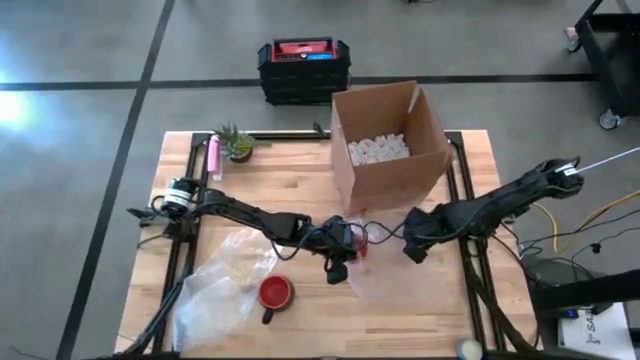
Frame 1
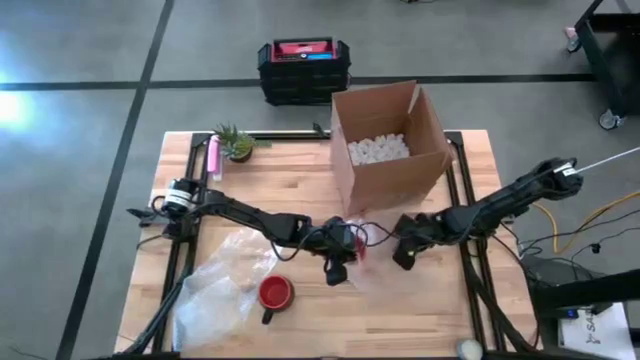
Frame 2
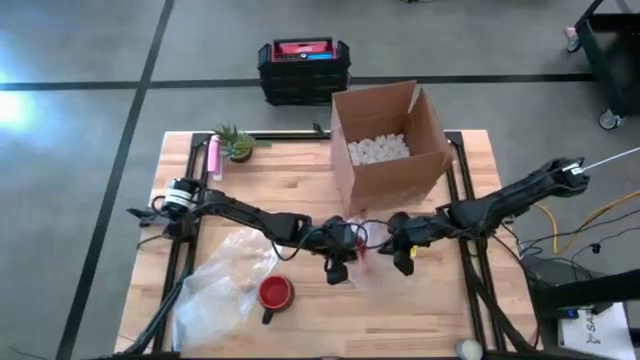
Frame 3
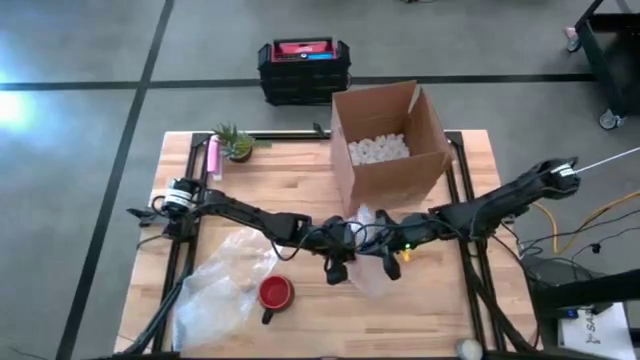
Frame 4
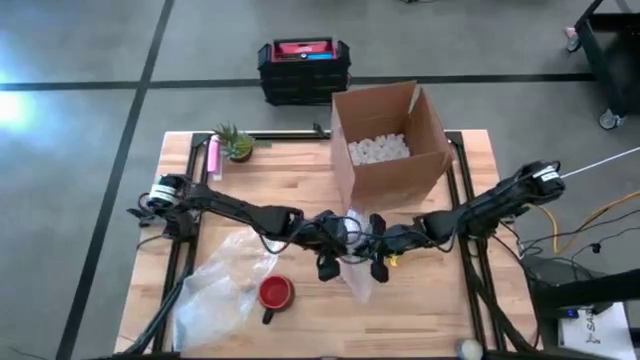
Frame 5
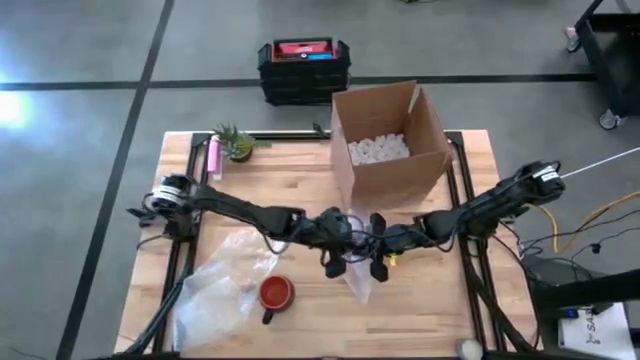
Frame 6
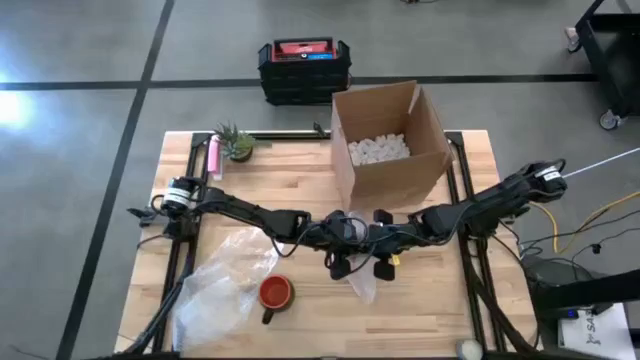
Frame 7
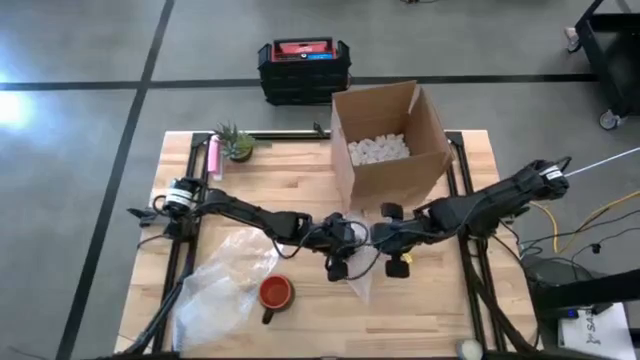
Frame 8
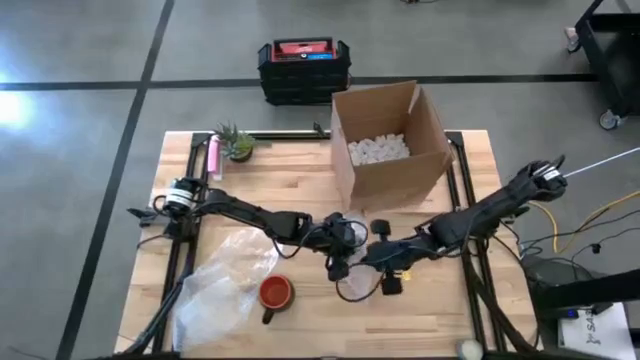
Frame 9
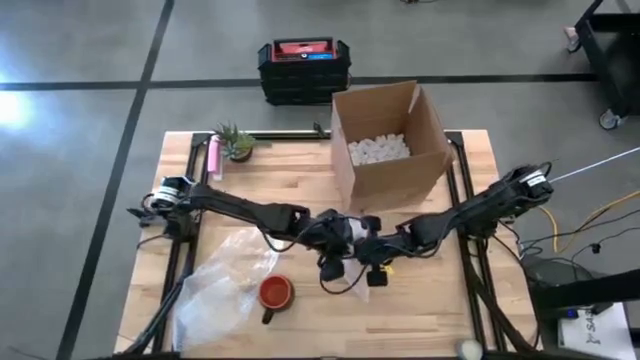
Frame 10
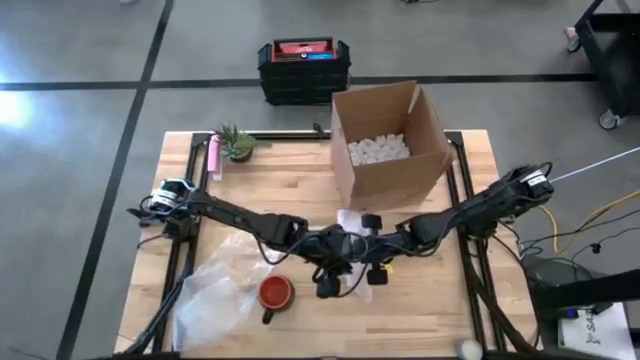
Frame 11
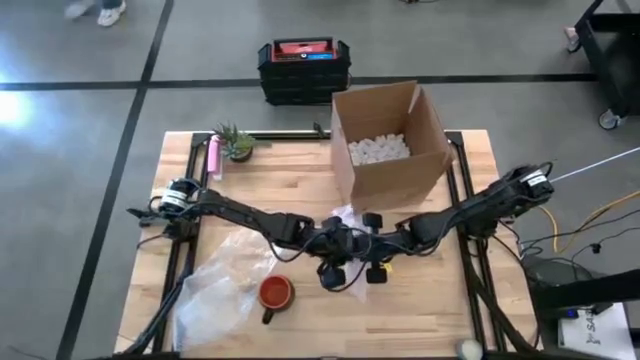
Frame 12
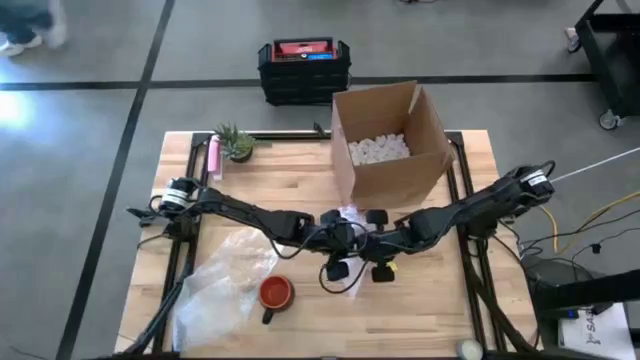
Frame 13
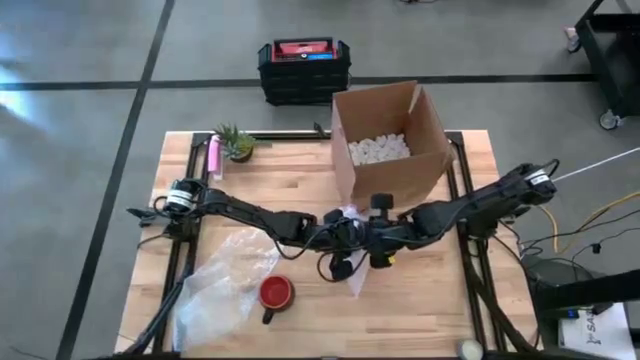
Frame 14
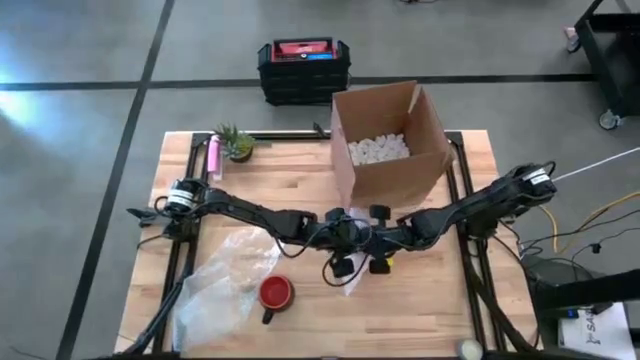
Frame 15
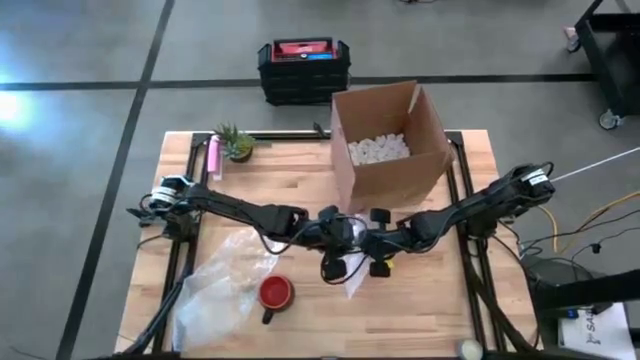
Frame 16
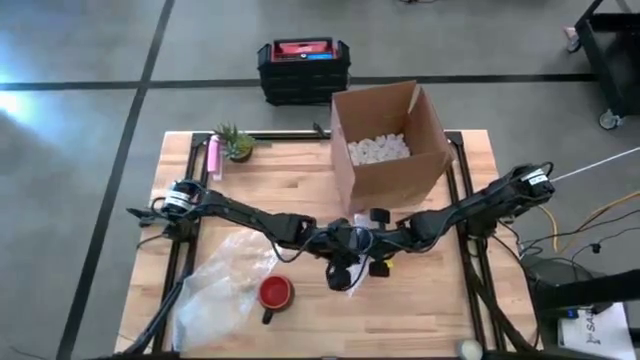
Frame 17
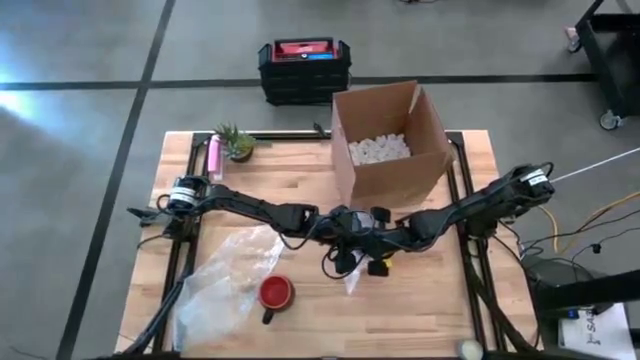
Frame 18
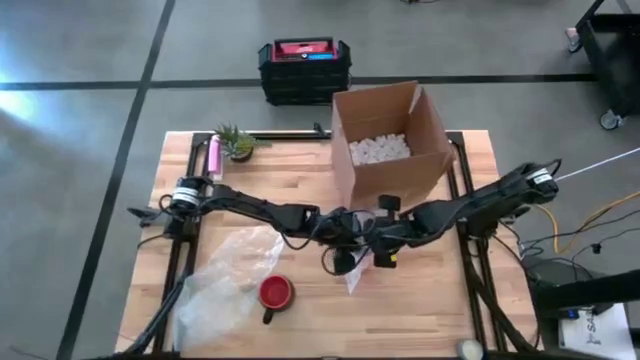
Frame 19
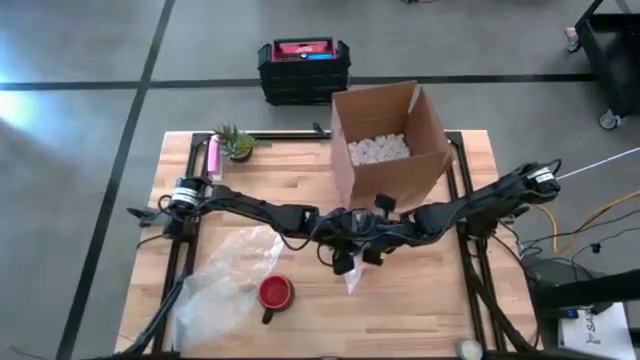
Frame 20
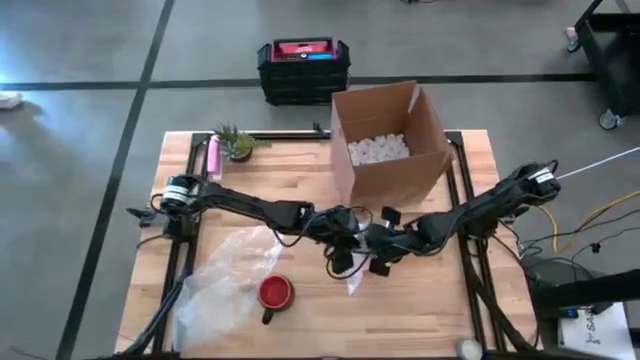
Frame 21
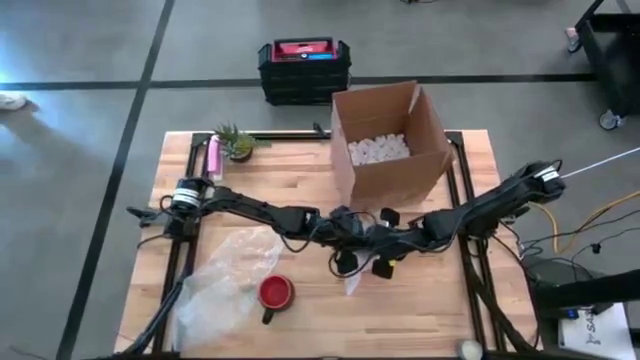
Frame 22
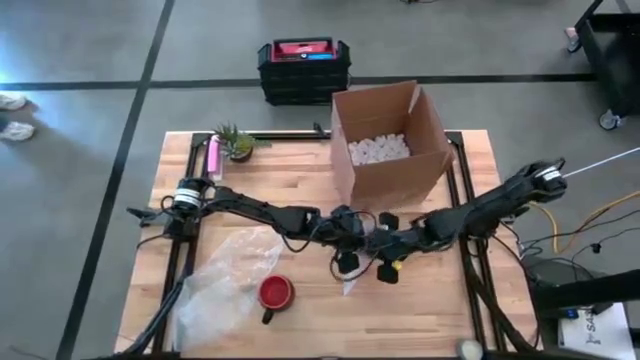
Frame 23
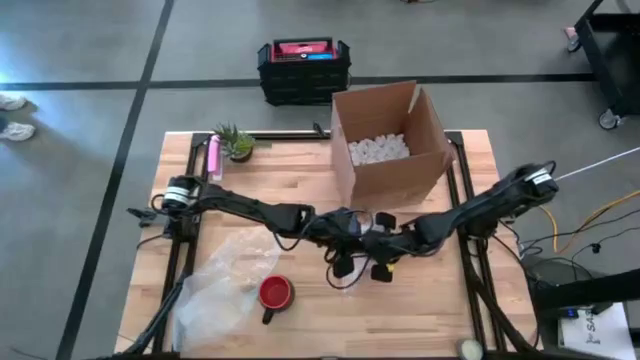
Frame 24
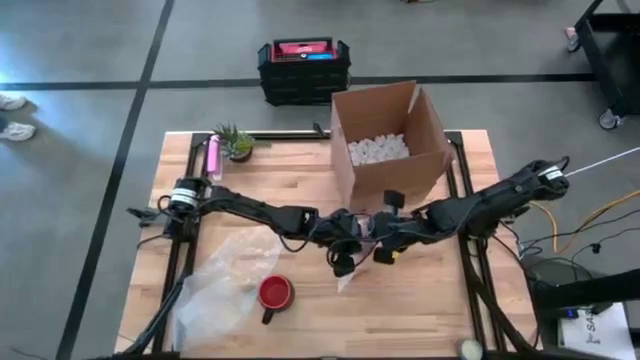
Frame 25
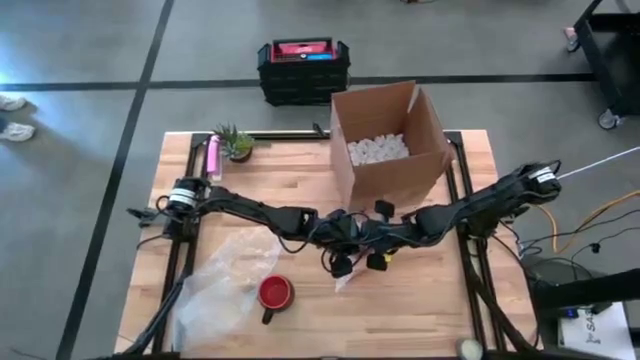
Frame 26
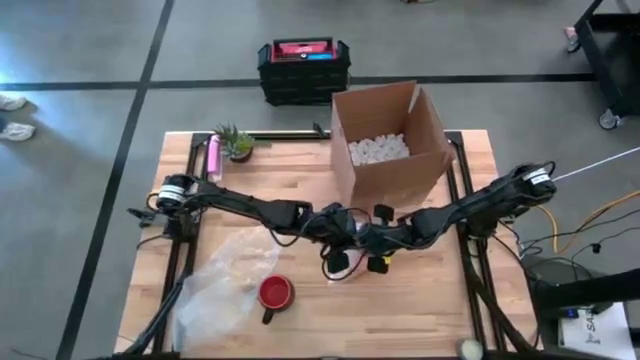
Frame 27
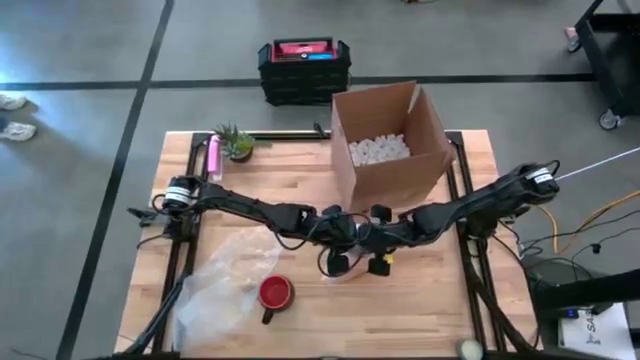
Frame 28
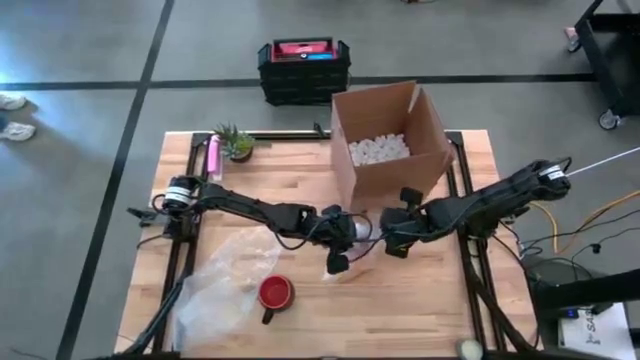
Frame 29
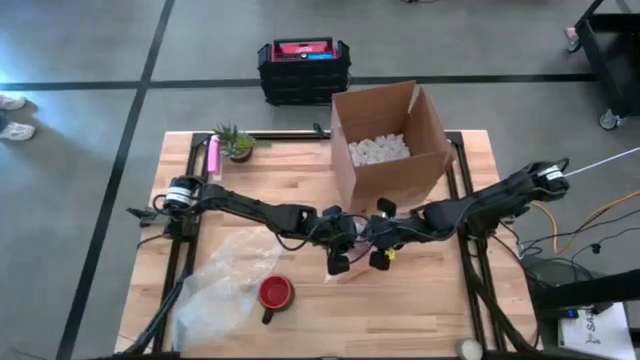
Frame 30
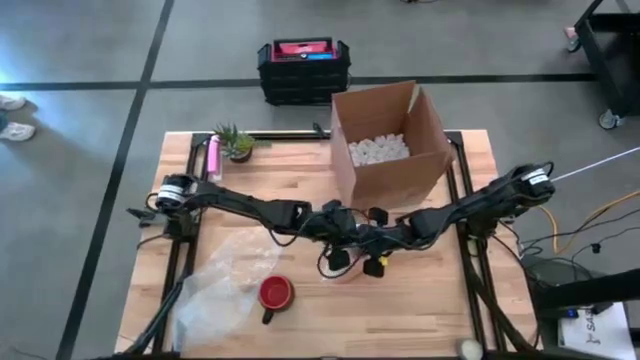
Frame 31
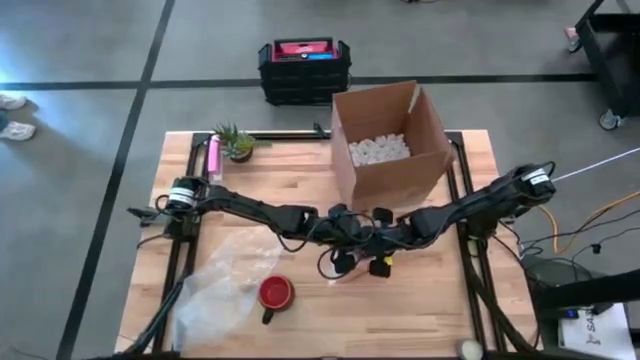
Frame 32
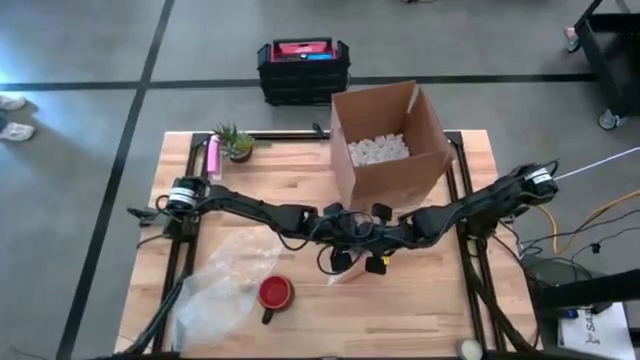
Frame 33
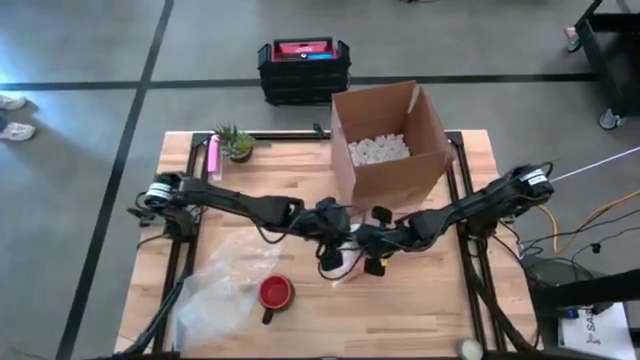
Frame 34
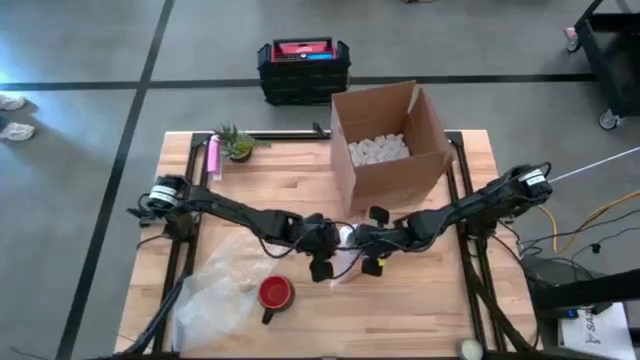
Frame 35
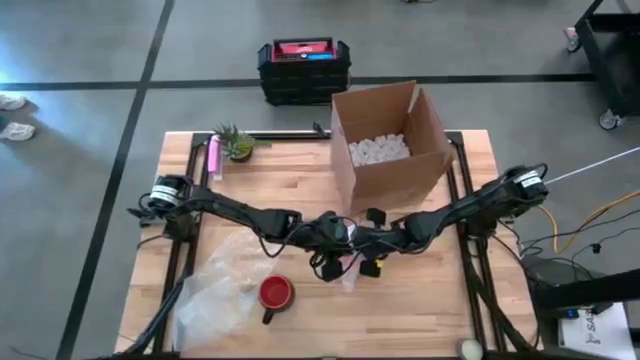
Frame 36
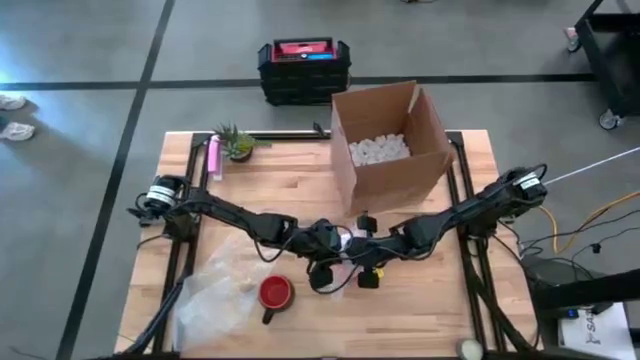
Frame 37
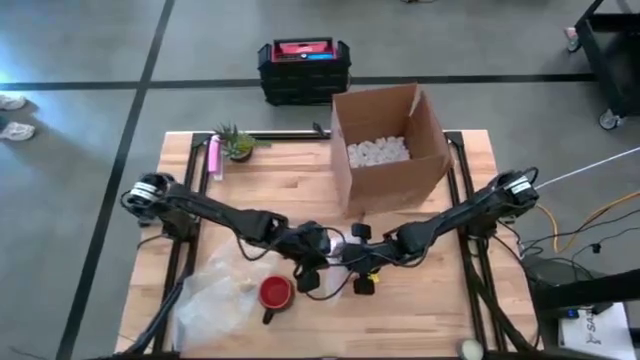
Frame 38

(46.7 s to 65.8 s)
Task: wrap mug
Wrap the orange mug with the right transparent bubble wrap
